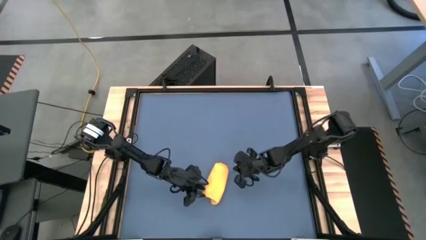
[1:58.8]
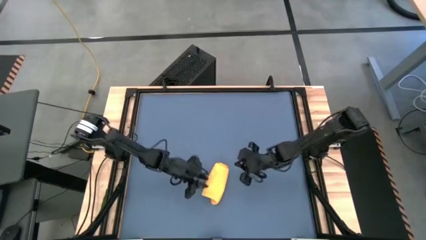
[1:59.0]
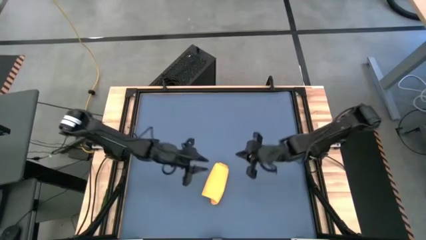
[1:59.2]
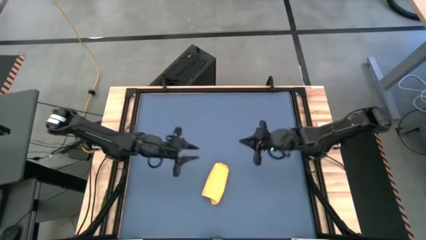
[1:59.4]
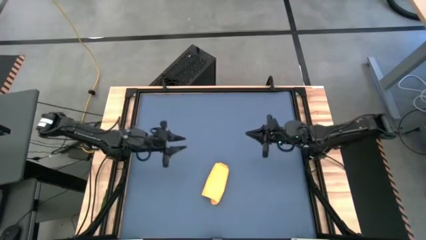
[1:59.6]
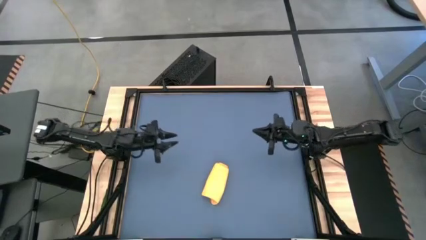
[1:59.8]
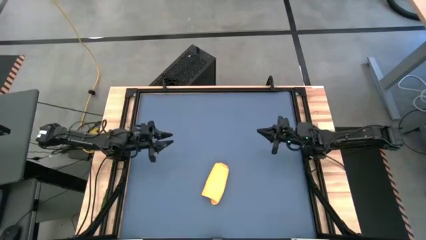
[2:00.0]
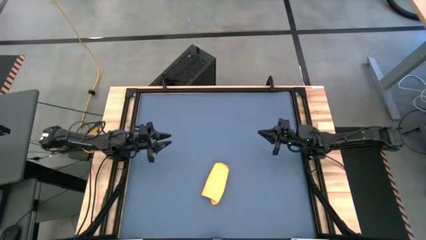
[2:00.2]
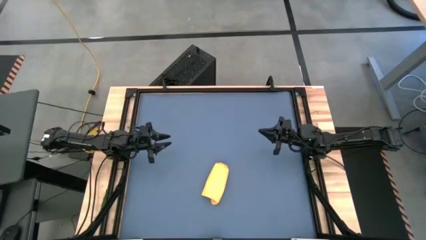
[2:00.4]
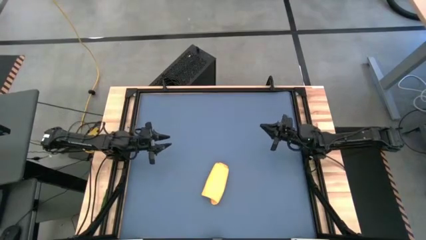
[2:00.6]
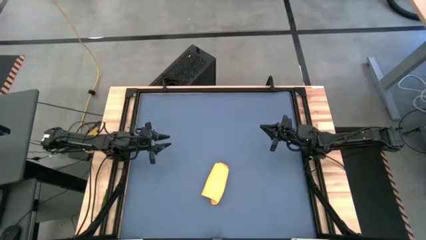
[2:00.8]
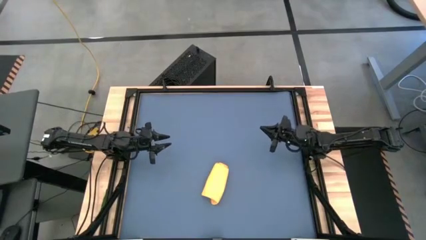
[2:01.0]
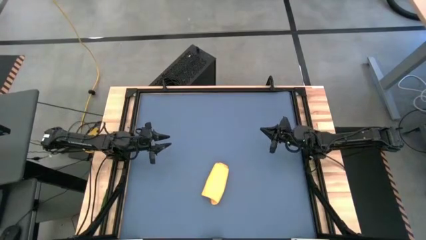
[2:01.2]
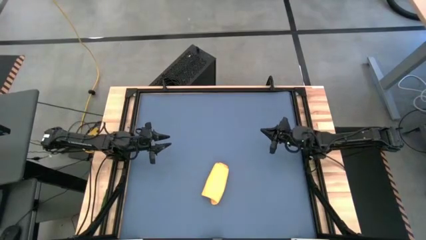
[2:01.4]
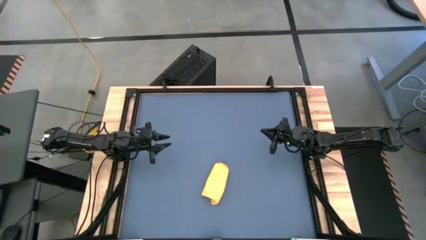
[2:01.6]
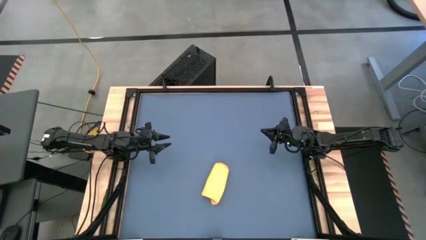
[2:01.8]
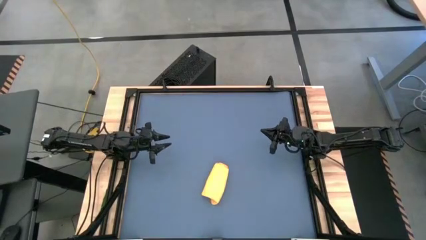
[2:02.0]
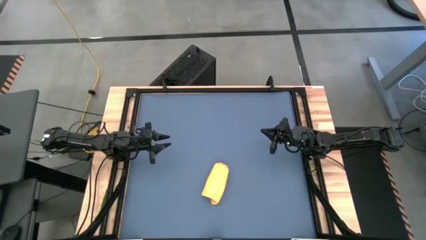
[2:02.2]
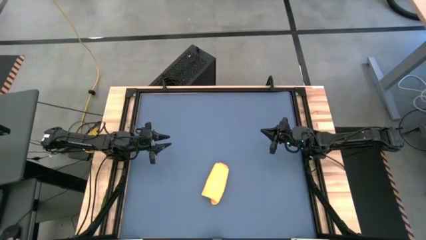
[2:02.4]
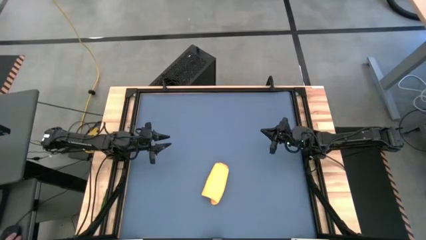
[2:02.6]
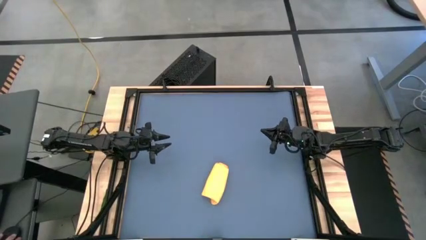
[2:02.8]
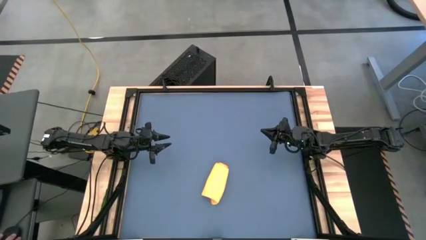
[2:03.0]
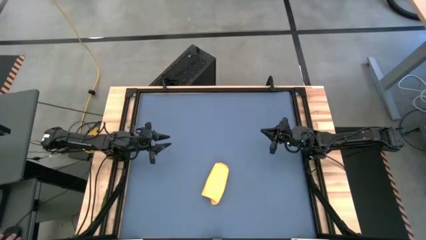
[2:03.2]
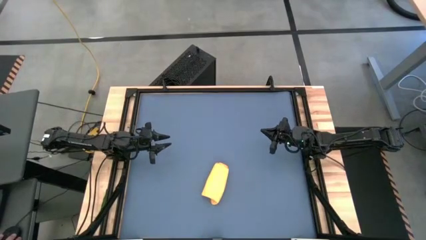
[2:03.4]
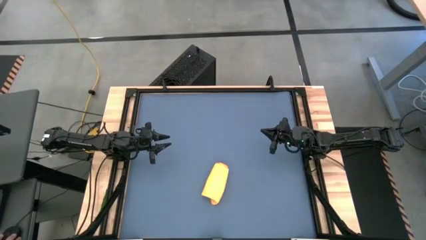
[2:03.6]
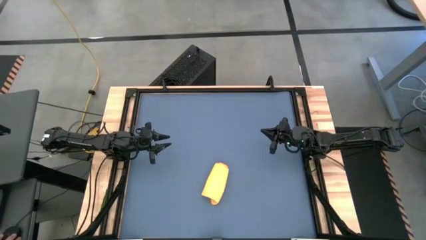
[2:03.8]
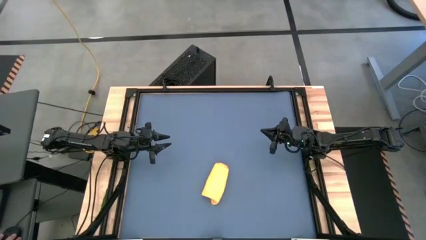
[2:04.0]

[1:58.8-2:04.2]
Task: Roll towel
Return to Home Position

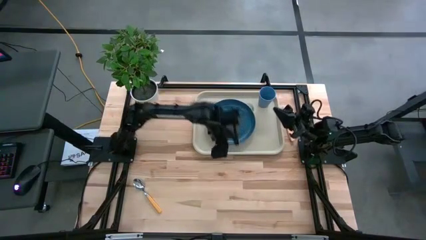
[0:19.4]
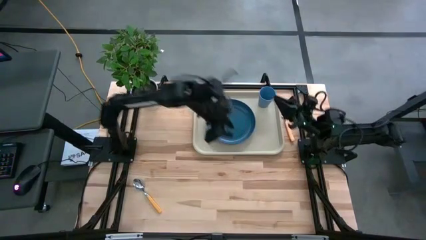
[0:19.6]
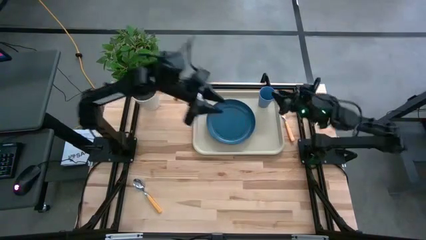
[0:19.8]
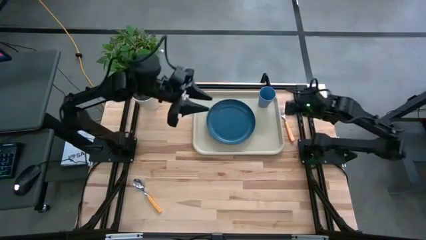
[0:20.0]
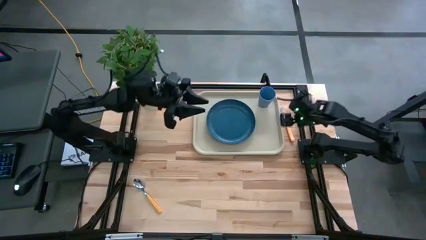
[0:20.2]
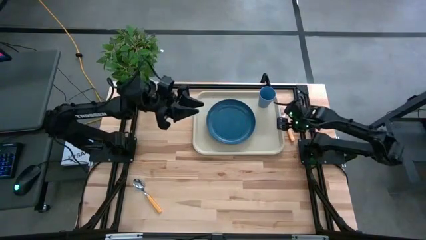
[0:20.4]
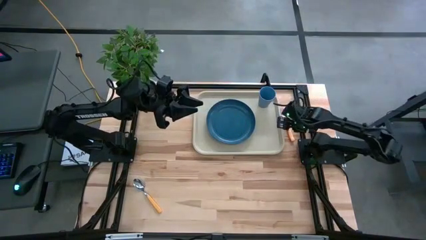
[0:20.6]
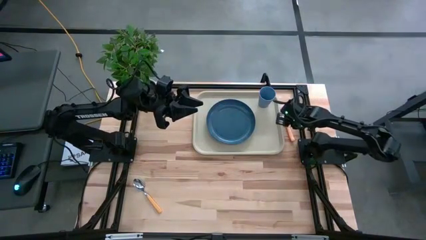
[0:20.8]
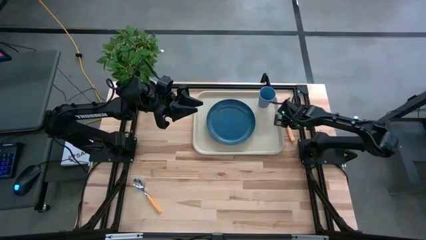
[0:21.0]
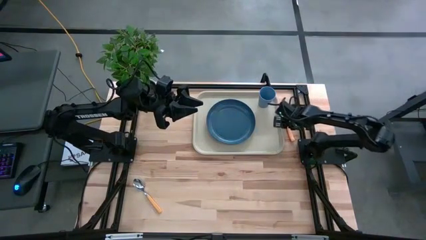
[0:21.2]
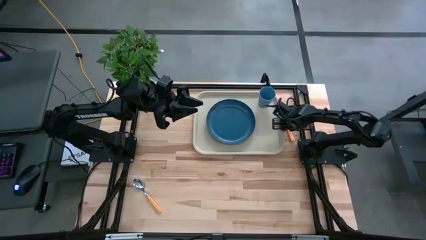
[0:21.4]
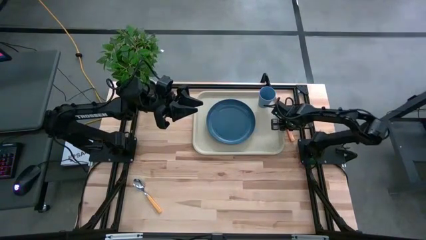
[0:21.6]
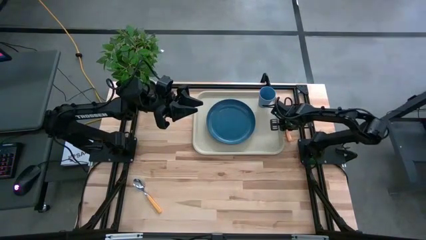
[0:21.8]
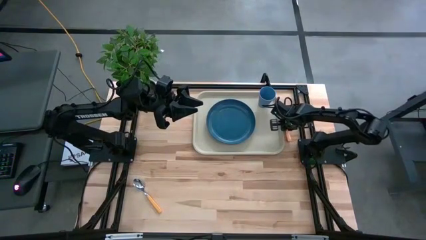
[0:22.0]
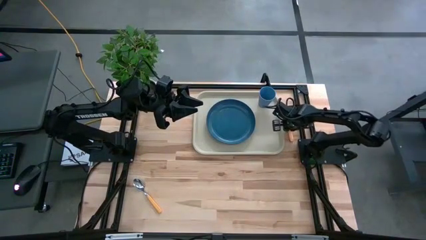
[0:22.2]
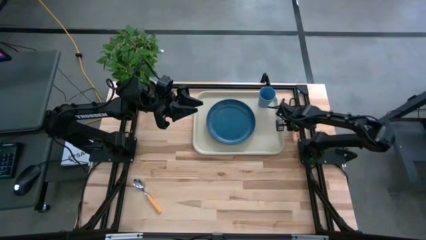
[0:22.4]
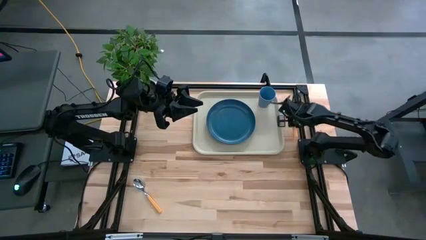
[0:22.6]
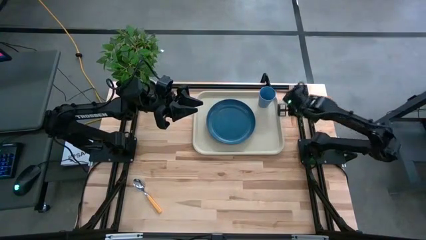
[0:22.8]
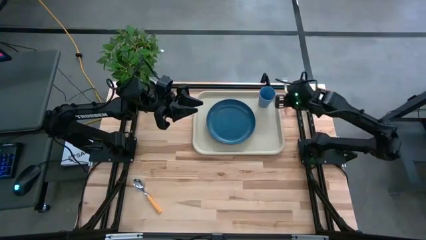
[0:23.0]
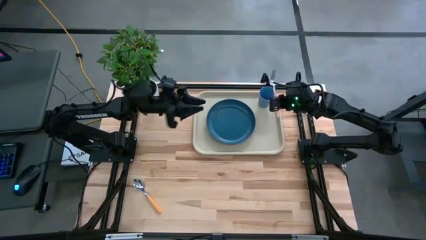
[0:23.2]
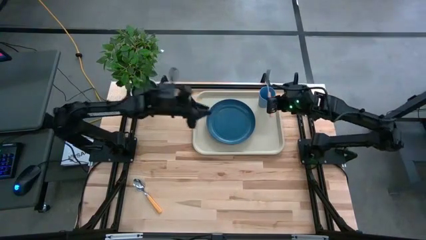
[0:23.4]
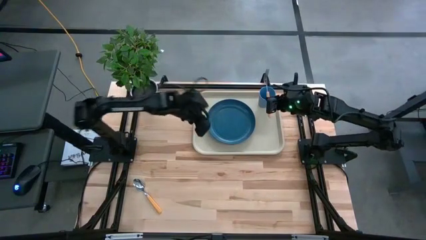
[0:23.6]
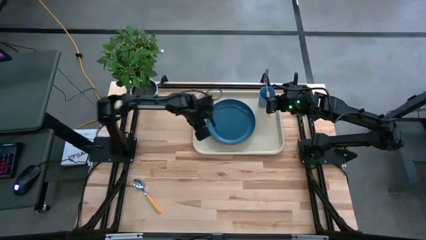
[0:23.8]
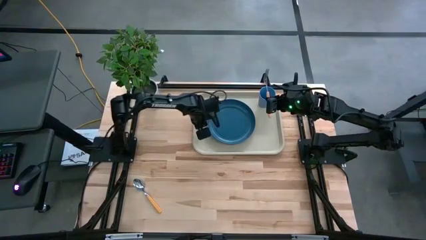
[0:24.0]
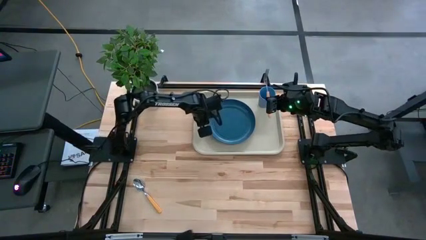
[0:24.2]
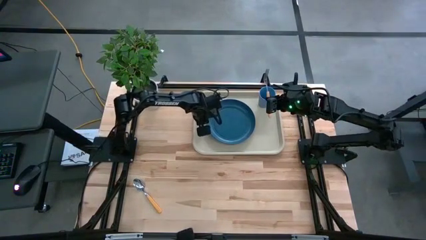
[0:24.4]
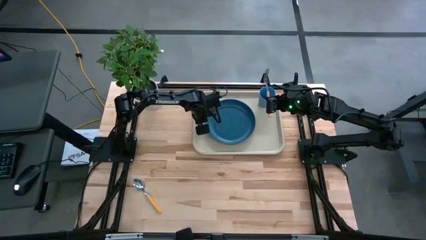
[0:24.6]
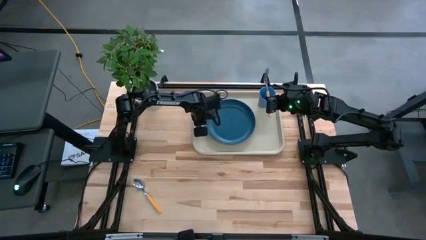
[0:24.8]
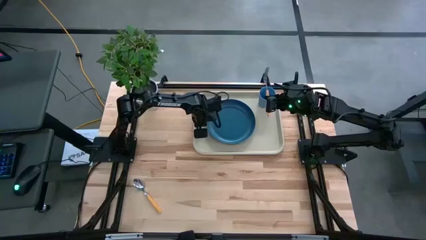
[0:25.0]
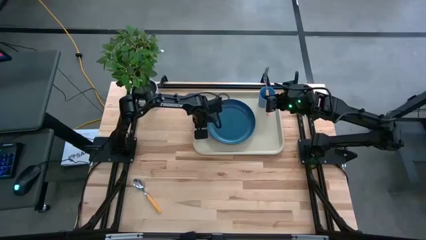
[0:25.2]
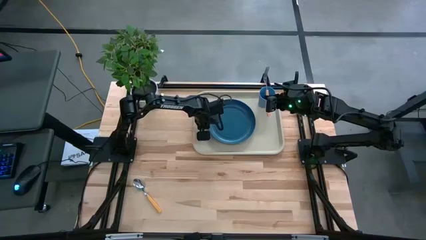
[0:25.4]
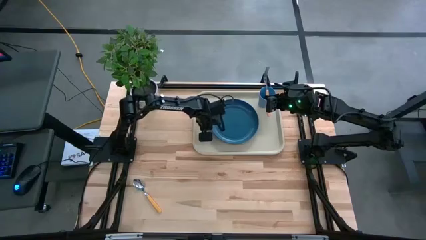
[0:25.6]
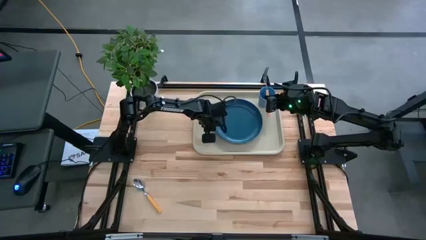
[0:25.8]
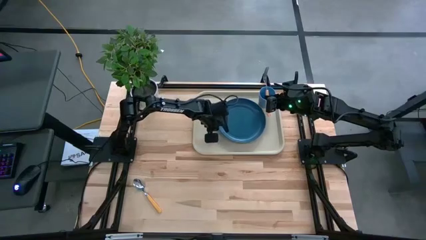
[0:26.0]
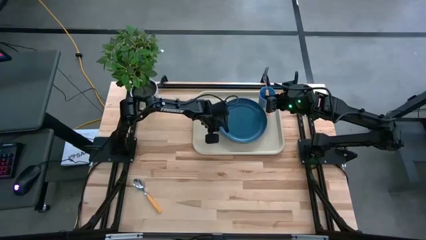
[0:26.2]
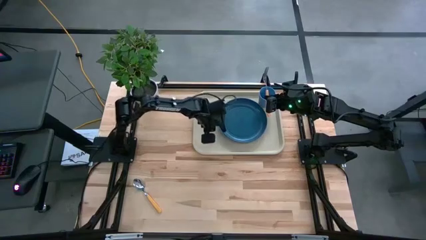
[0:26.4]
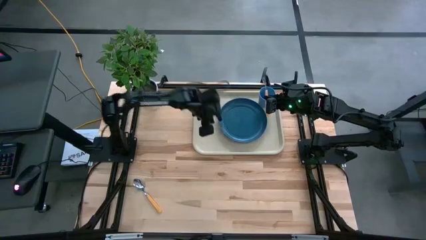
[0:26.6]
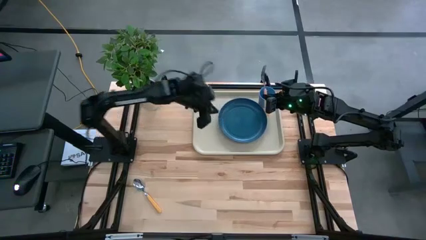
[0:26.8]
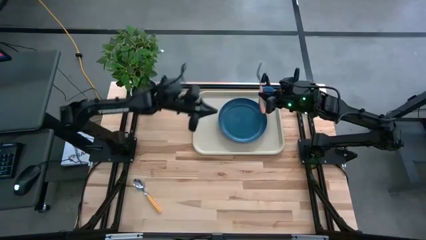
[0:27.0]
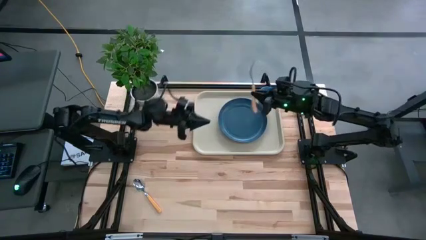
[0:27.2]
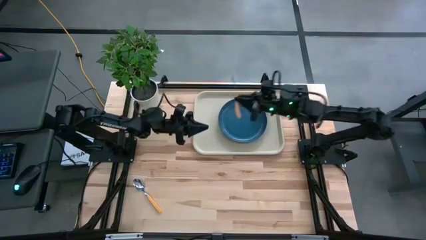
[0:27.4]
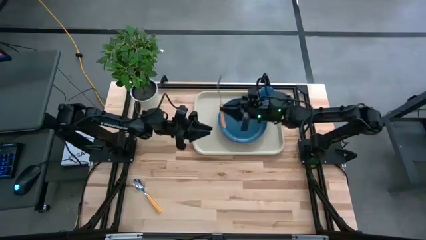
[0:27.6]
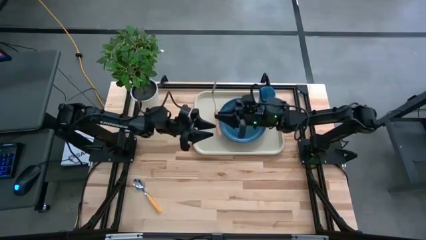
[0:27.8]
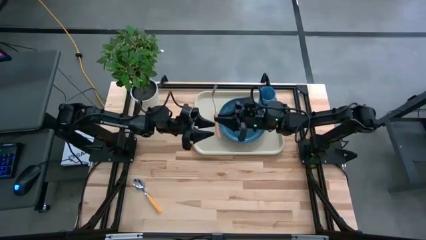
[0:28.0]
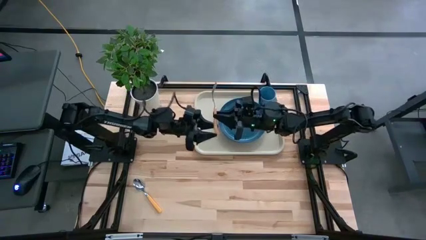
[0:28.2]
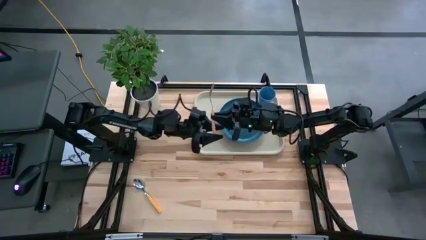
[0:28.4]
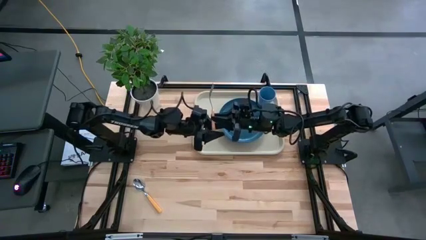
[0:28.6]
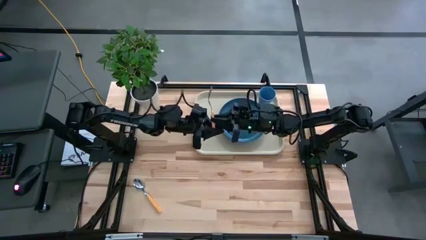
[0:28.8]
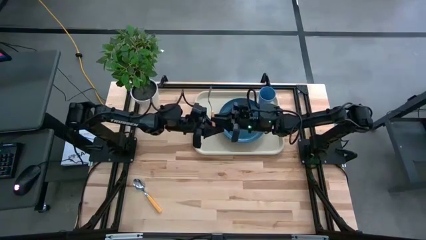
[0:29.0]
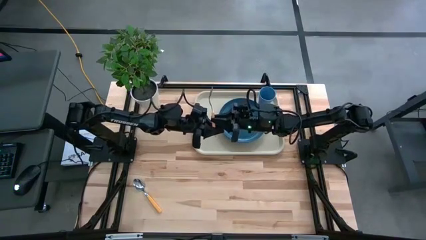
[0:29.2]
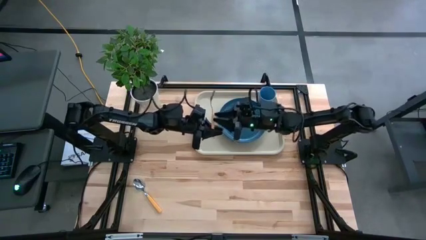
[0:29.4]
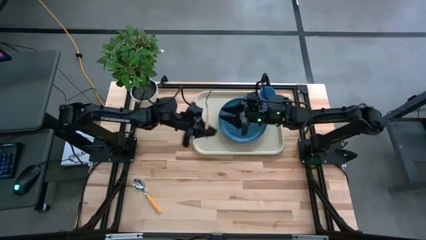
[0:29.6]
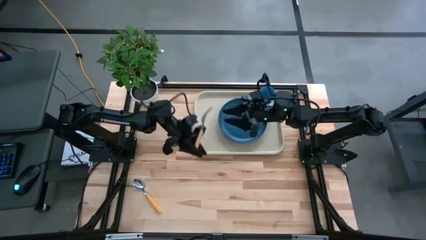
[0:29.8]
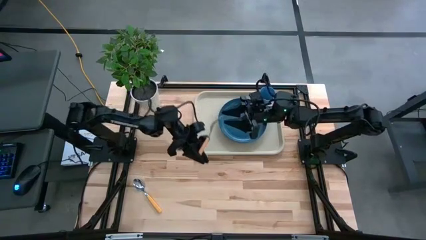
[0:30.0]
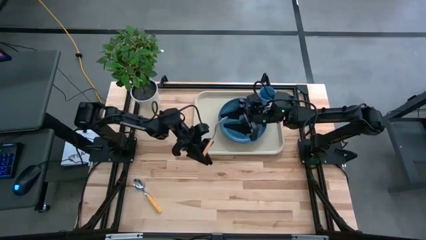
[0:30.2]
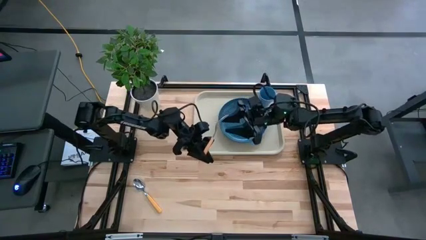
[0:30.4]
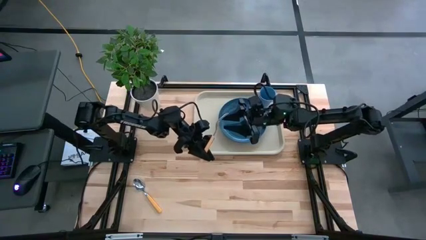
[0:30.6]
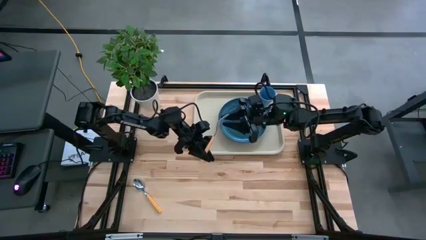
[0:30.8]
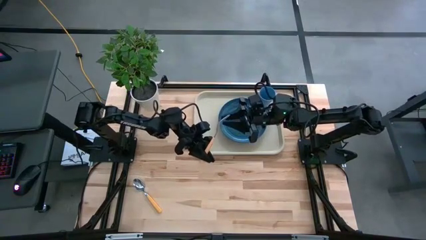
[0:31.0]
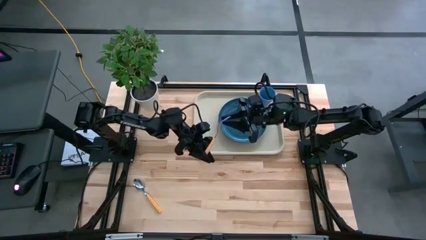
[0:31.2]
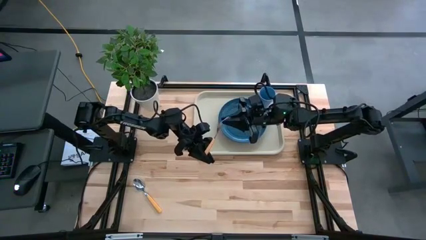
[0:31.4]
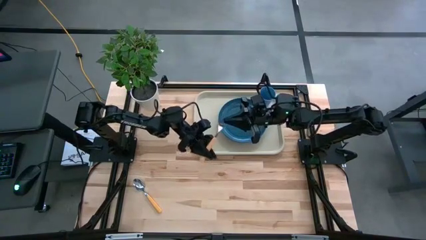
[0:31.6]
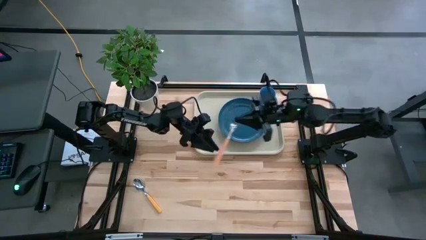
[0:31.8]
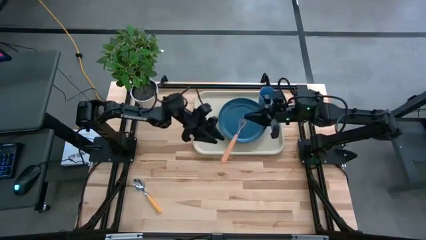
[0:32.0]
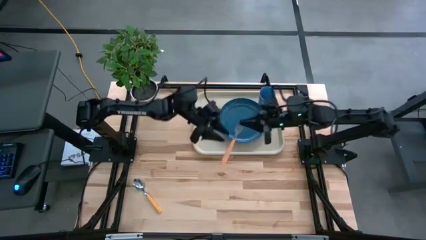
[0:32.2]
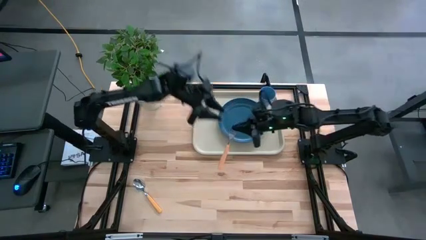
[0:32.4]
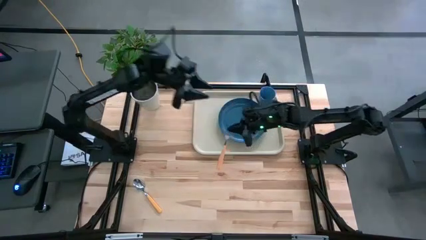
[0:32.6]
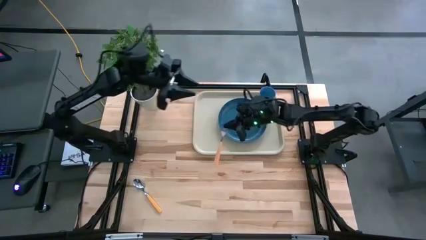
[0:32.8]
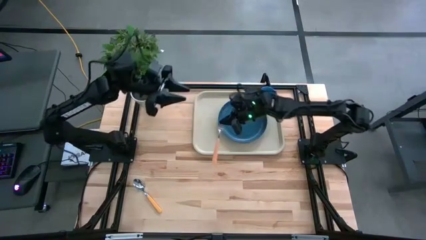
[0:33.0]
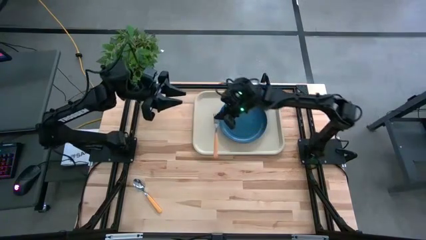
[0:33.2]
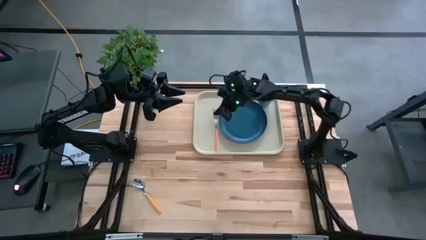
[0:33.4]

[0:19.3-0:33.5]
Task: Pick and place plate/cup/fork/spoon on tray
Put the brown fork on the gray serving tray to the left of the blue plate
